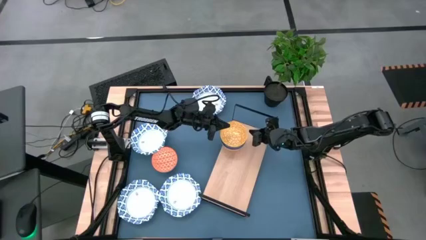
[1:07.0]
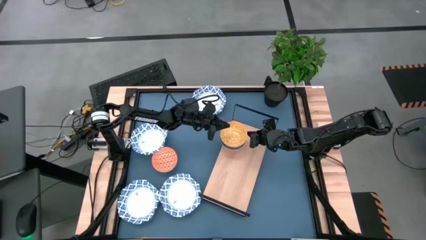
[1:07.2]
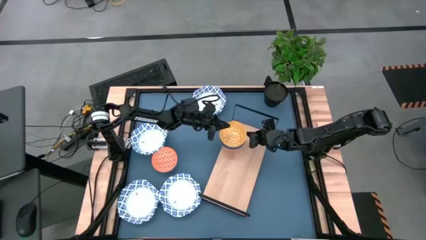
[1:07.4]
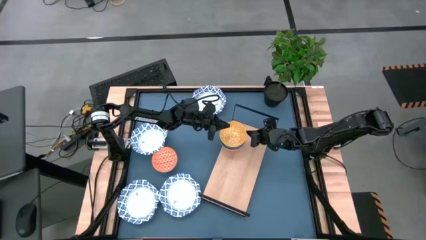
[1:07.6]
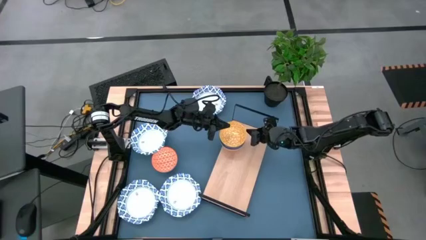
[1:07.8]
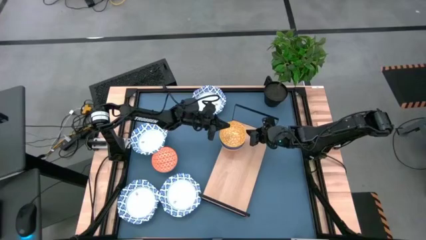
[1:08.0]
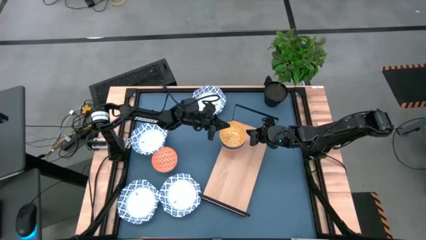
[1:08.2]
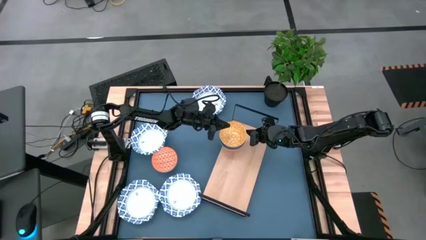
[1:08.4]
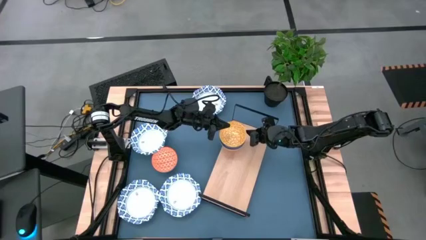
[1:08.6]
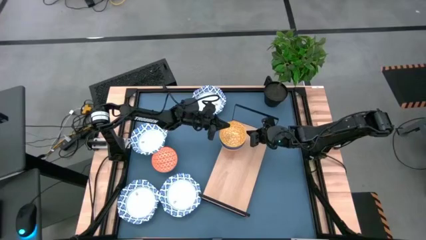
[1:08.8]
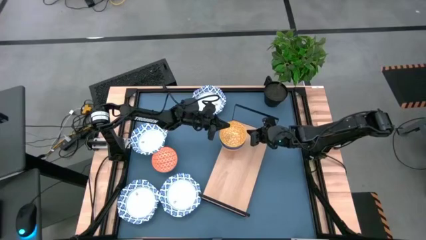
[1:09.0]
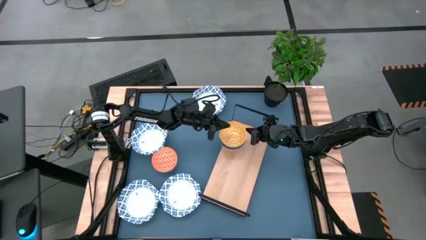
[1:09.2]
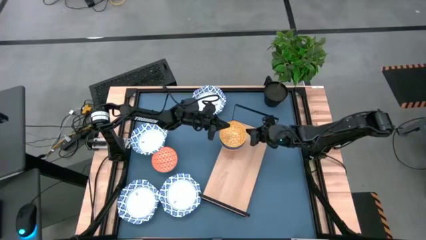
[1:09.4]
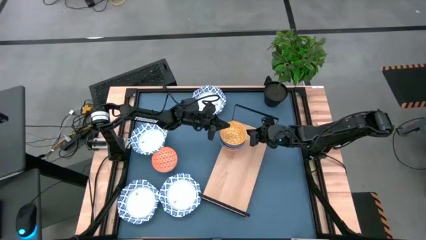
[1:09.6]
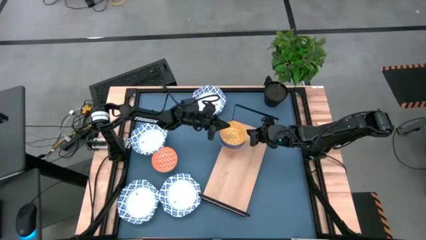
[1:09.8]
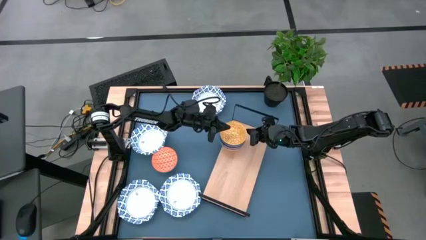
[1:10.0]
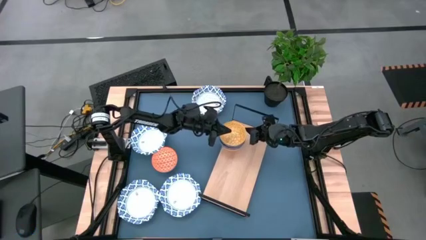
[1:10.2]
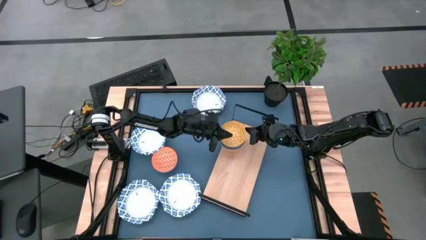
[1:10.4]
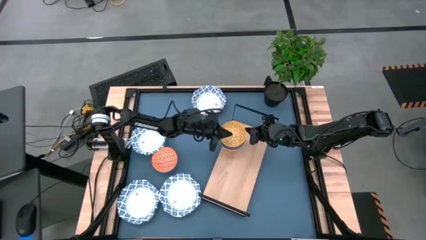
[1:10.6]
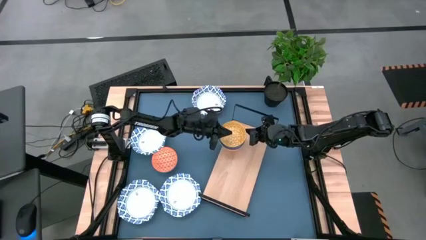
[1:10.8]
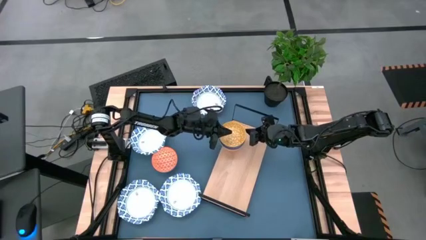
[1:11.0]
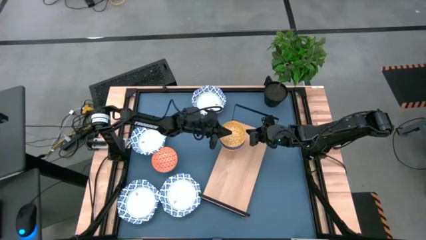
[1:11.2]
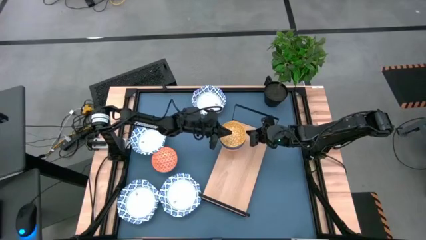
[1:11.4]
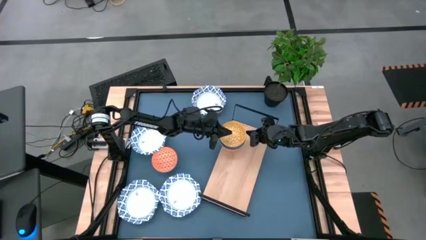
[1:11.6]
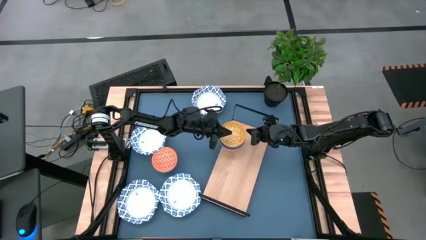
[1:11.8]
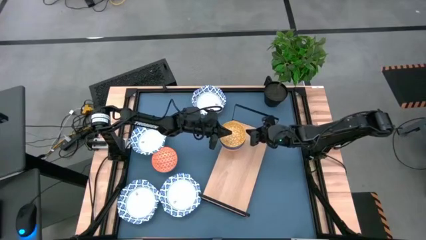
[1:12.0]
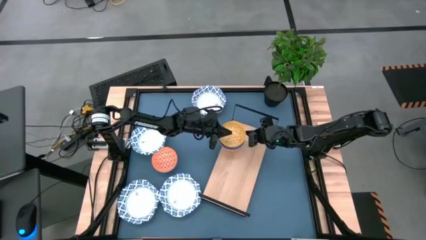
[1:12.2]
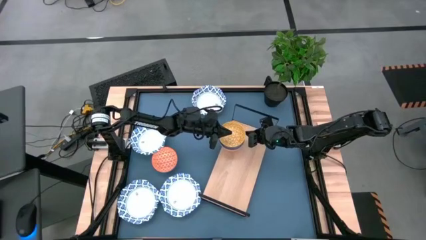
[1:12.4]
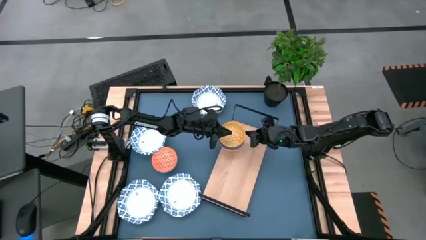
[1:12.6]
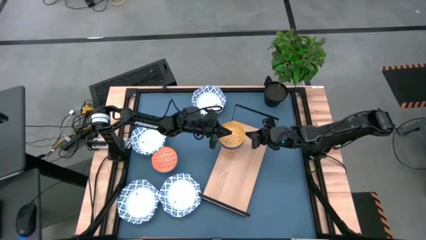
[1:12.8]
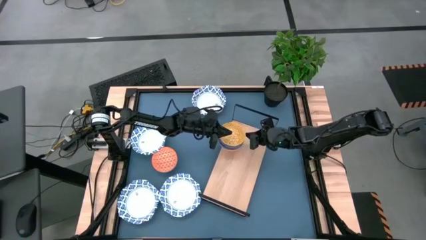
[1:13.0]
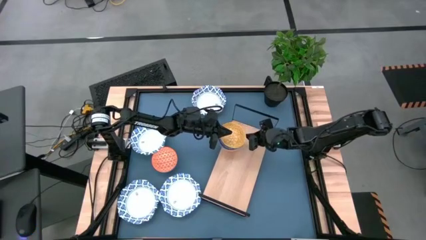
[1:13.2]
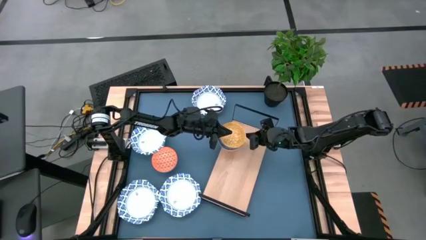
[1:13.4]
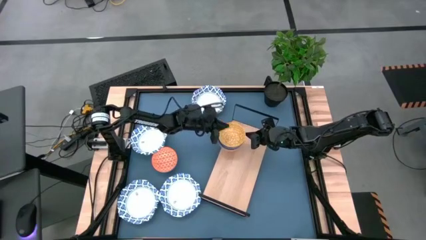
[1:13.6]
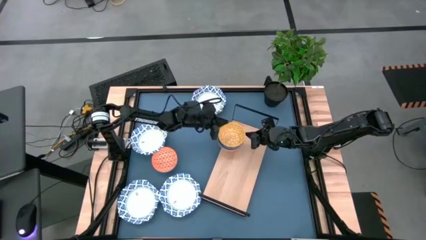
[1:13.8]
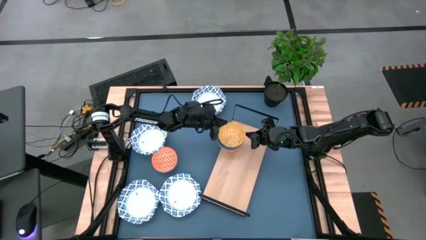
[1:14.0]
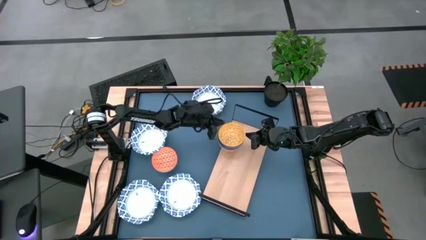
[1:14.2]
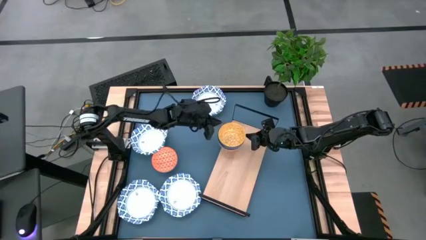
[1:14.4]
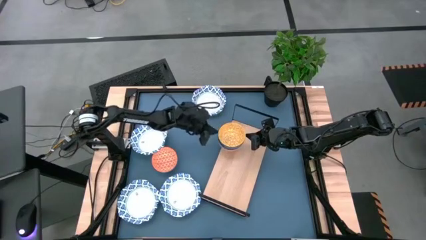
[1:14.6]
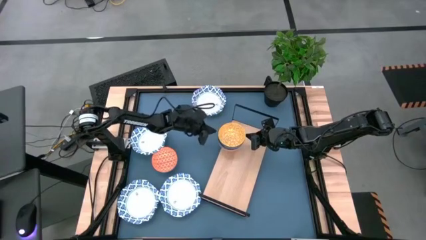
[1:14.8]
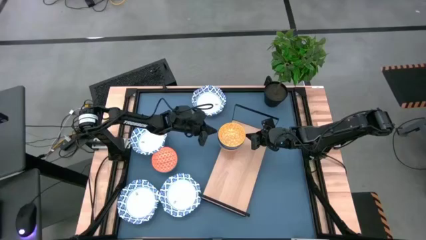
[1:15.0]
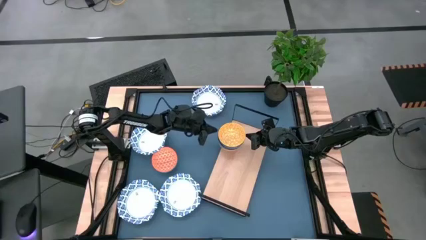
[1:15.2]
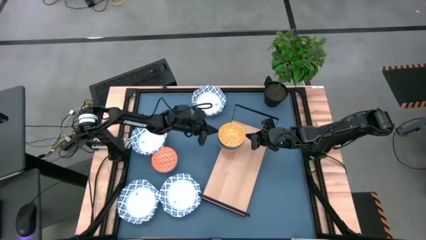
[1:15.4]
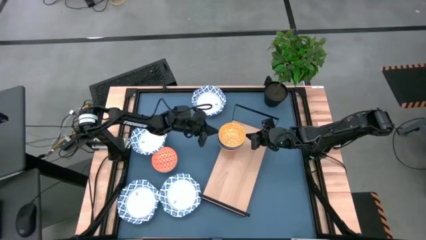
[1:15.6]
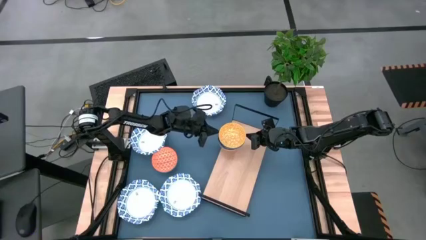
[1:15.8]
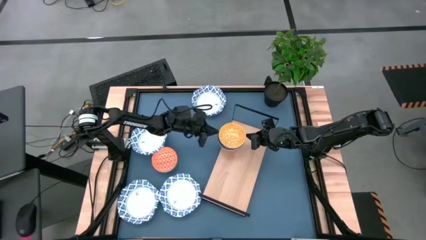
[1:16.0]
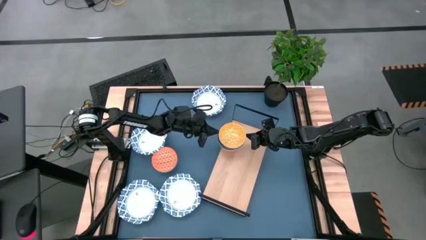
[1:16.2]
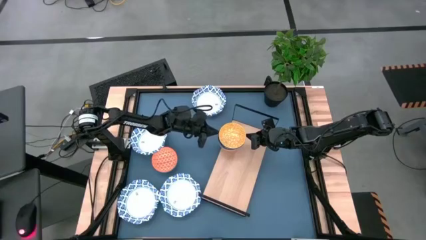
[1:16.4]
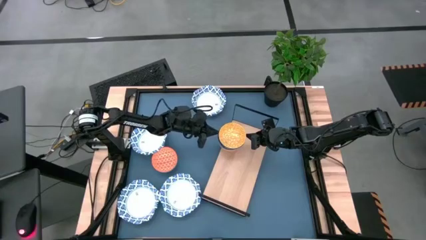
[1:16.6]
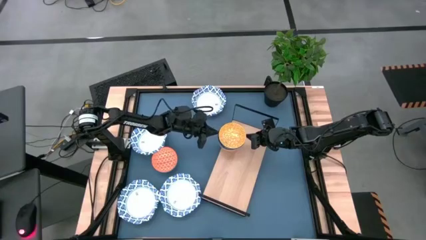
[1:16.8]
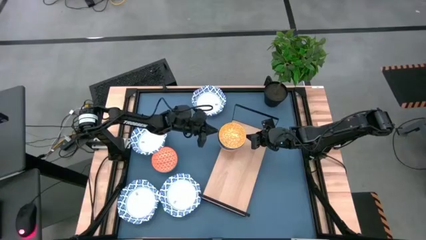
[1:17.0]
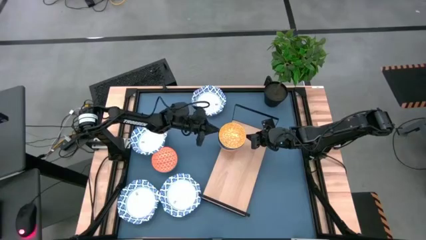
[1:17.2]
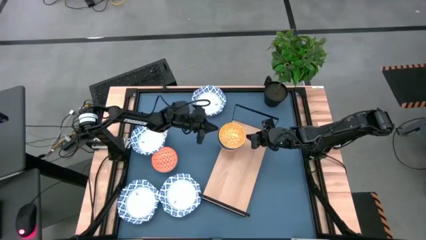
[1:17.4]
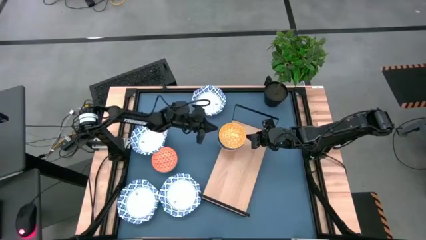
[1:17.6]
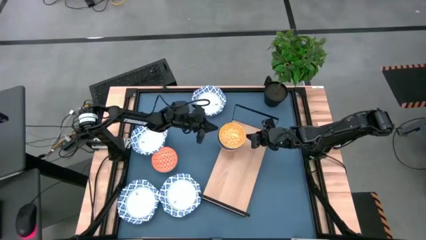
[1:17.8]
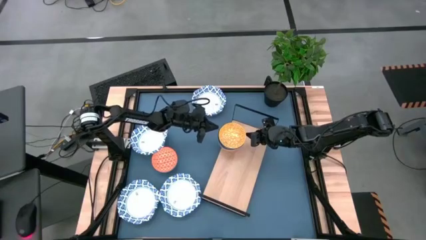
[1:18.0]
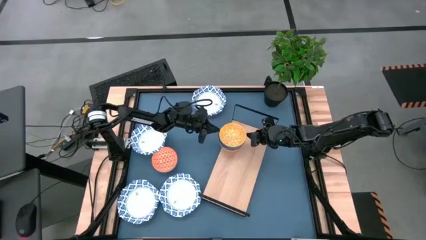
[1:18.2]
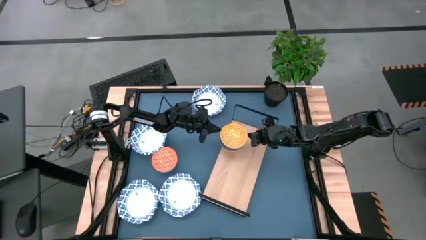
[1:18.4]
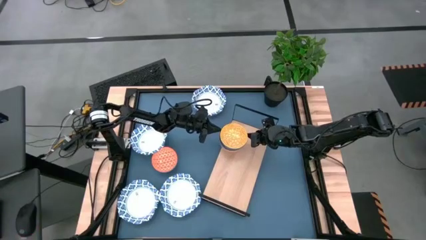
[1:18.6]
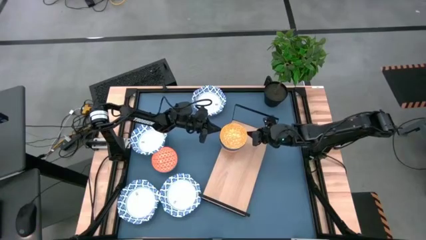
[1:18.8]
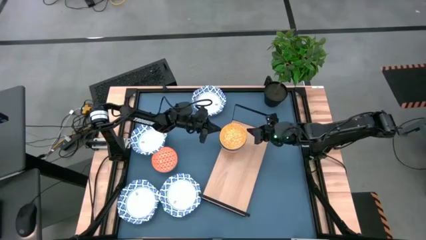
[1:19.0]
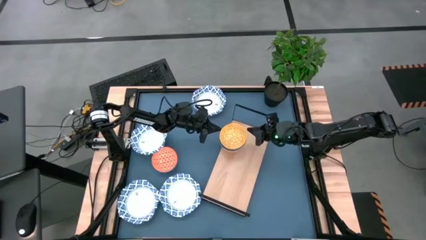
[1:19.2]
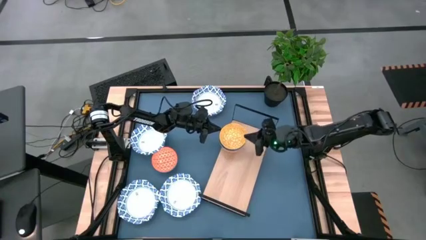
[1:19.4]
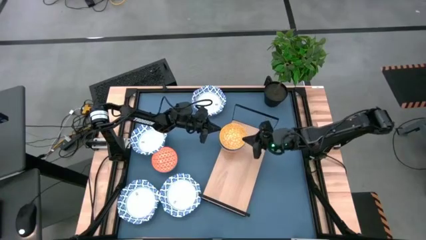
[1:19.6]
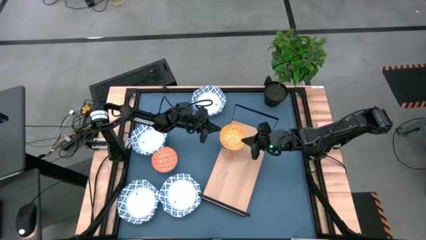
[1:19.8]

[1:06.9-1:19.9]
Task: Place and stack bowls onto a shelf
Adjust the stacked bowls on the shelf

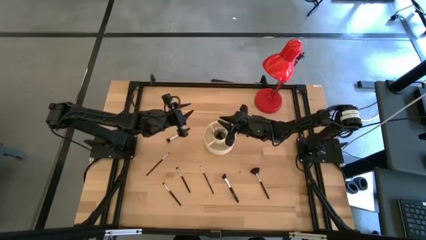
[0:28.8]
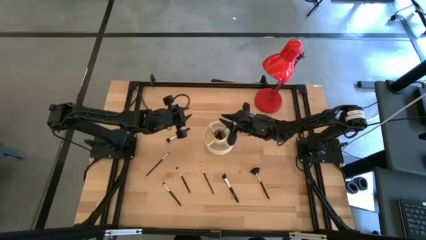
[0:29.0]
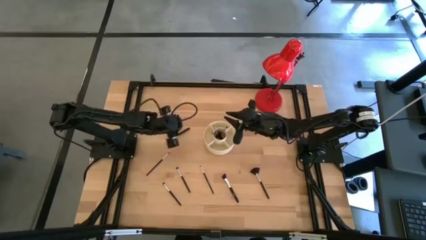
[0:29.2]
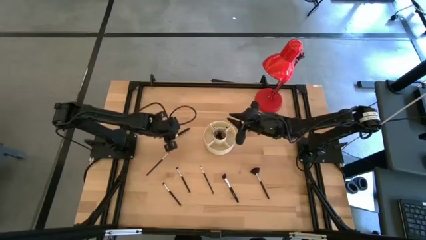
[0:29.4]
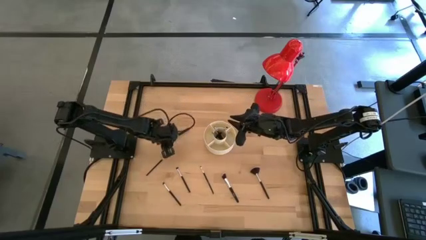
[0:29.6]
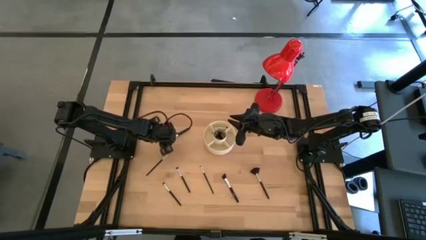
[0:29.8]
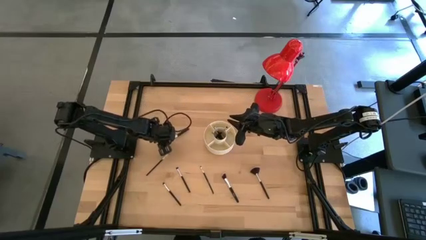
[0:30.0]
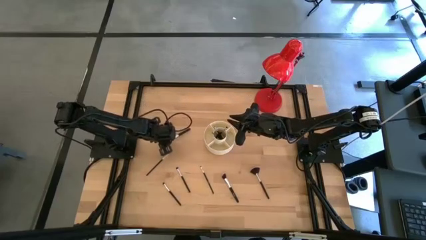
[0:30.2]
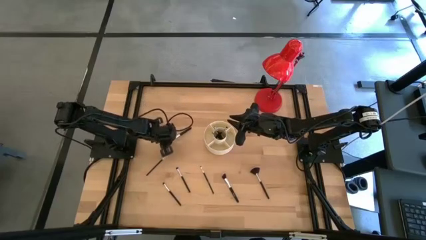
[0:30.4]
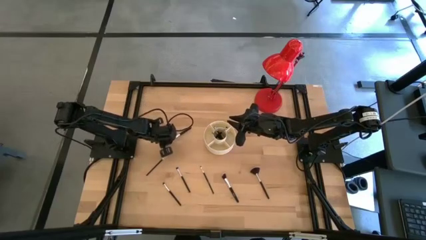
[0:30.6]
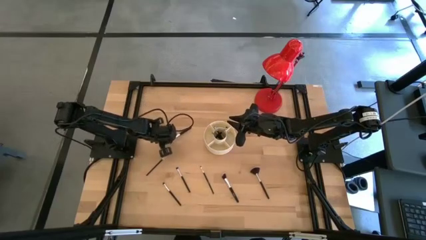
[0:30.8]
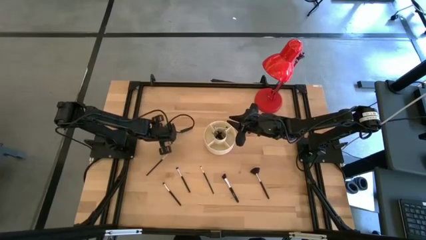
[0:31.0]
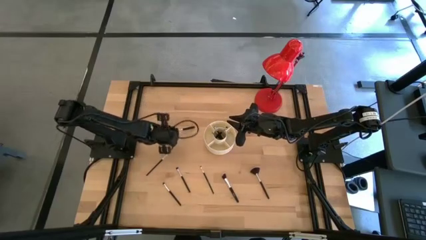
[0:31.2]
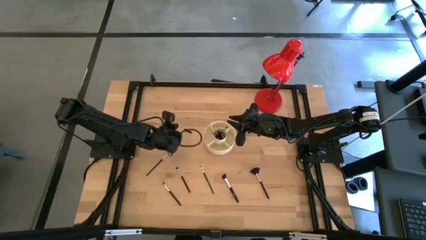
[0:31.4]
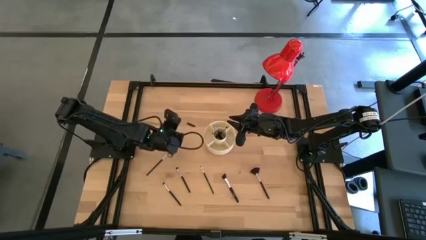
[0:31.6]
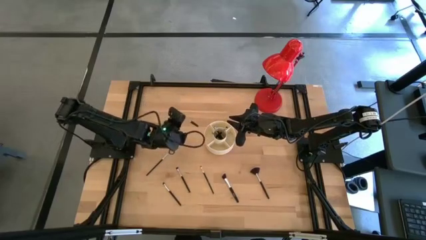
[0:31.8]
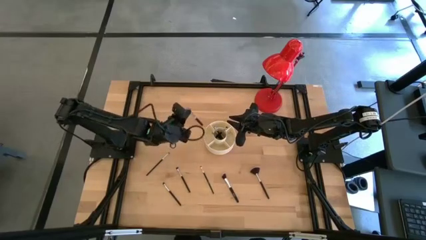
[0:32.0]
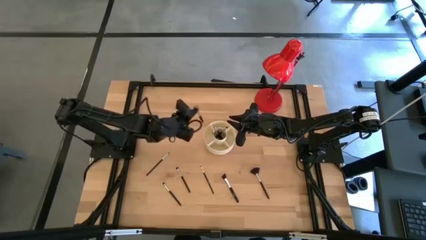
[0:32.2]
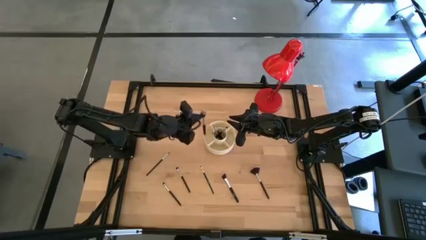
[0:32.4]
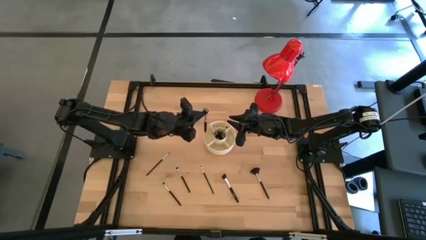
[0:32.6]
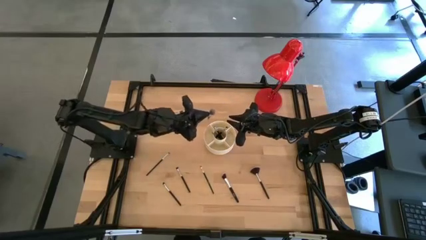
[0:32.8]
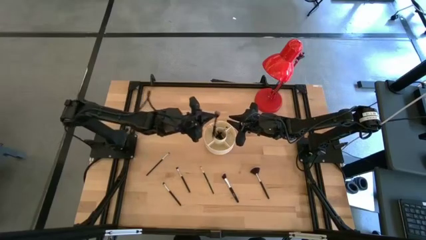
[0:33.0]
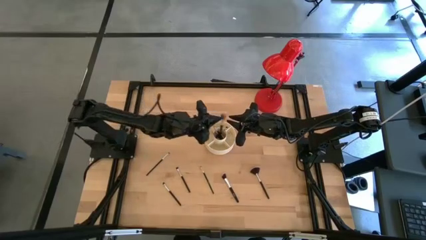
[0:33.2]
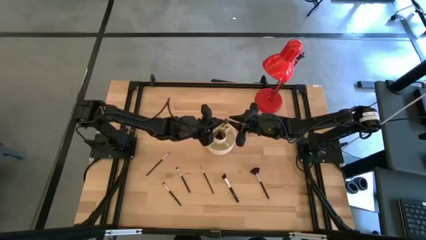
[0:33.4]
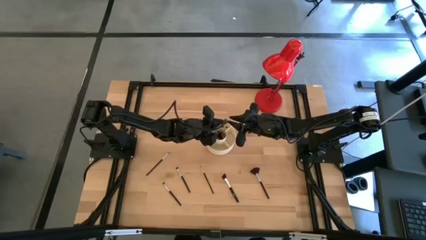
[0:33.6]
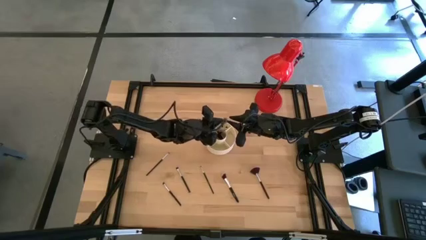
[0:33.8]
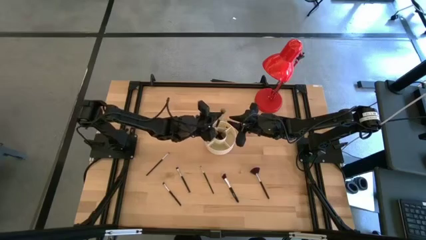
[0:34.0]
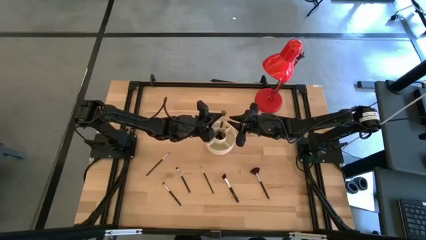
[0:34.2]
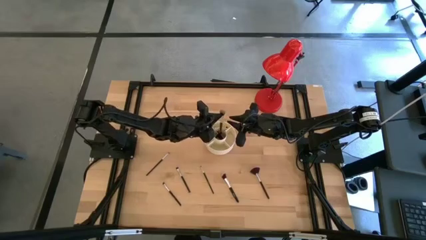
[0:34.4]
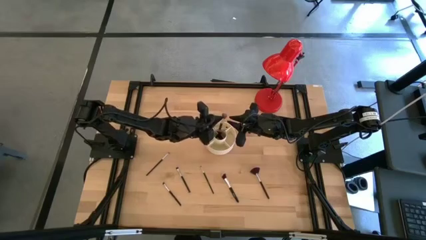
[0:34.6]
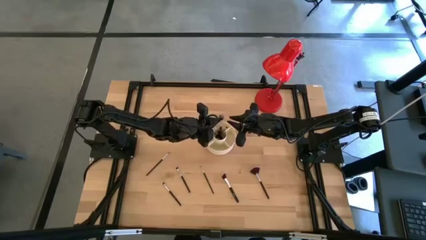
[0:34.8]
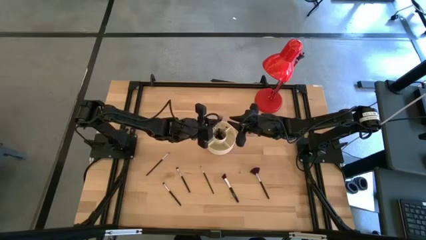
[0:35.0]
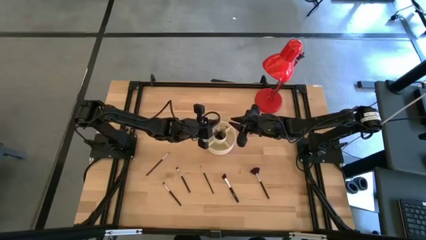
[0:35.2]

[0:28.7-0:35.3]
Task: Put items in baskets/containers
Put the powder brush into the brush organizer
